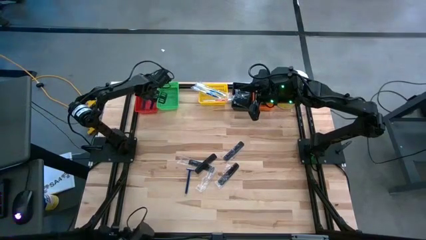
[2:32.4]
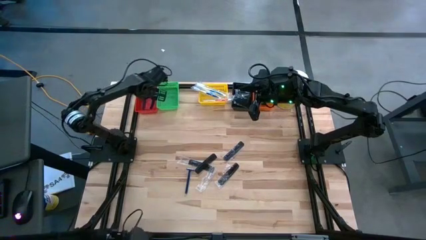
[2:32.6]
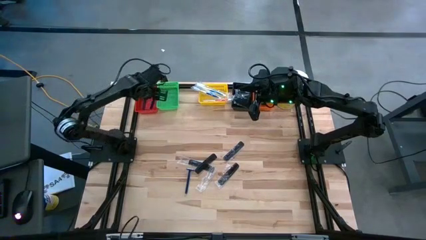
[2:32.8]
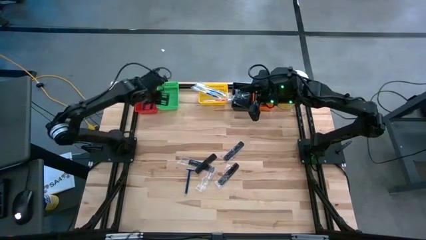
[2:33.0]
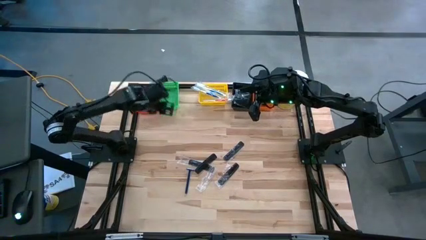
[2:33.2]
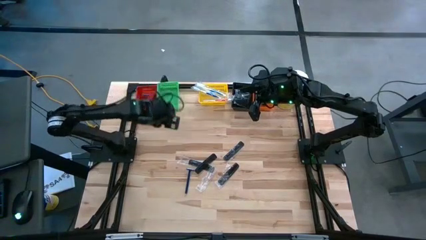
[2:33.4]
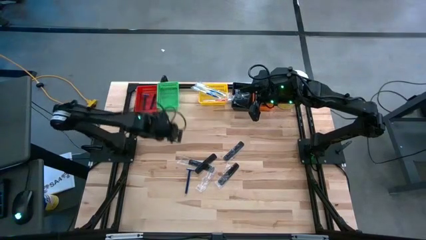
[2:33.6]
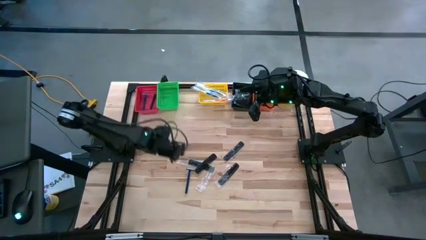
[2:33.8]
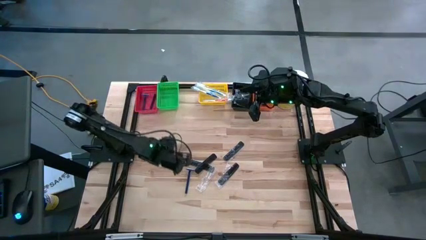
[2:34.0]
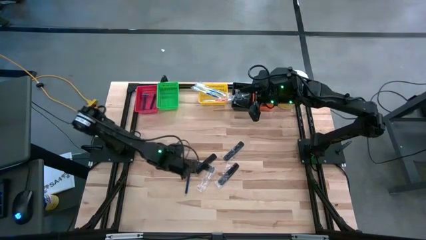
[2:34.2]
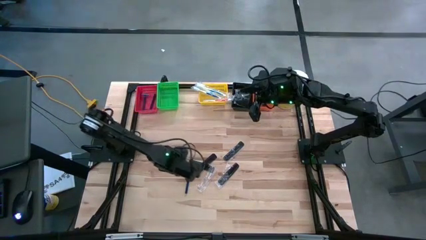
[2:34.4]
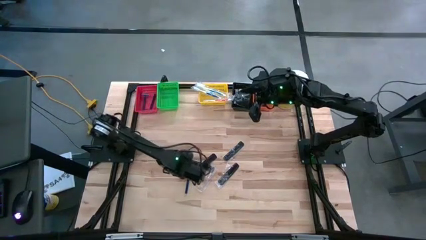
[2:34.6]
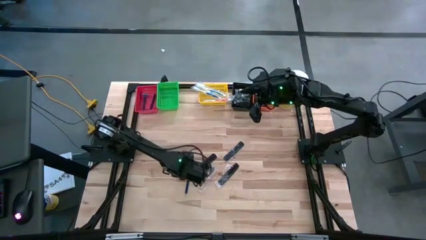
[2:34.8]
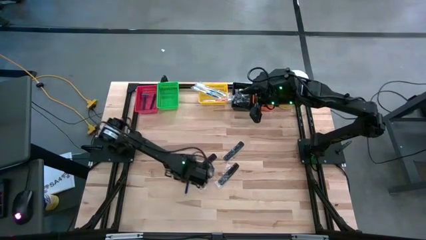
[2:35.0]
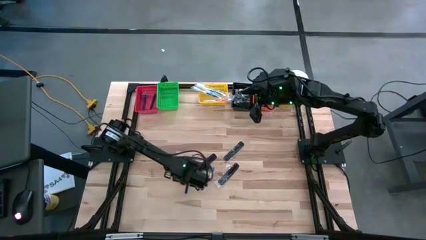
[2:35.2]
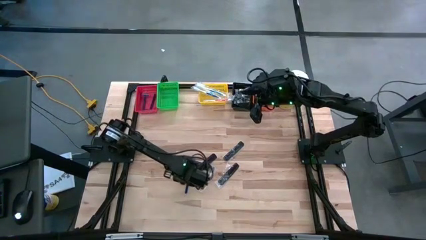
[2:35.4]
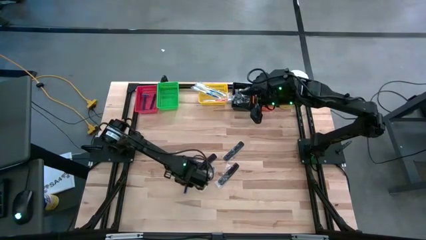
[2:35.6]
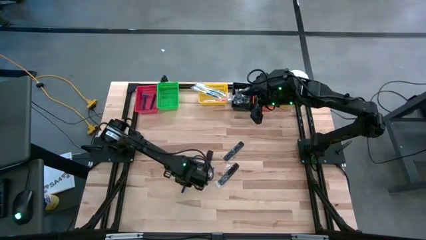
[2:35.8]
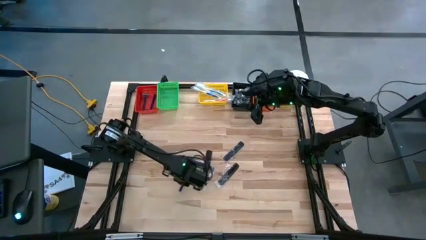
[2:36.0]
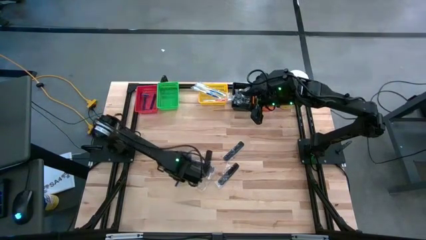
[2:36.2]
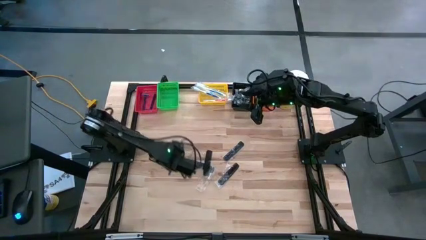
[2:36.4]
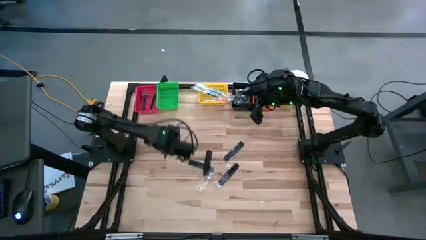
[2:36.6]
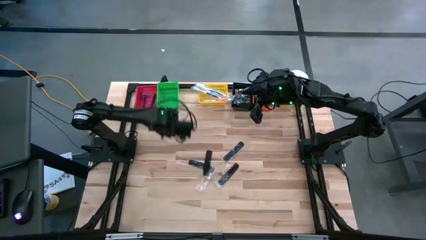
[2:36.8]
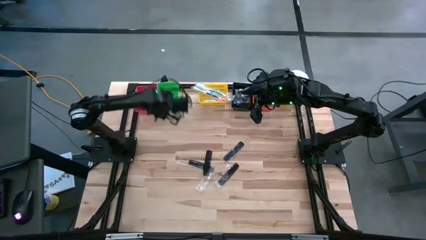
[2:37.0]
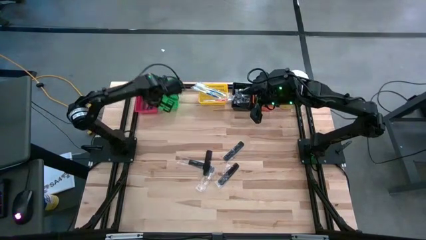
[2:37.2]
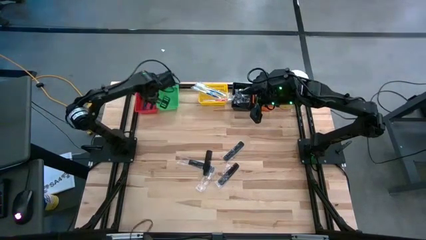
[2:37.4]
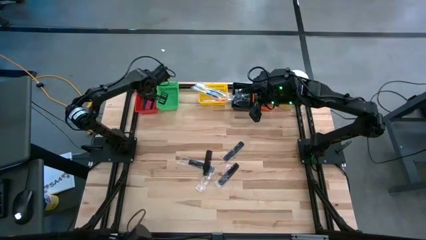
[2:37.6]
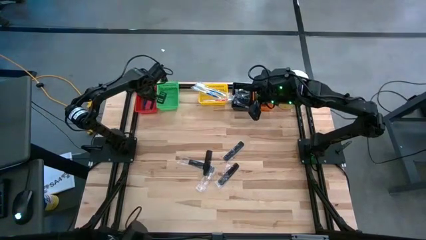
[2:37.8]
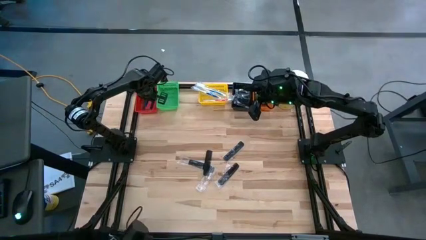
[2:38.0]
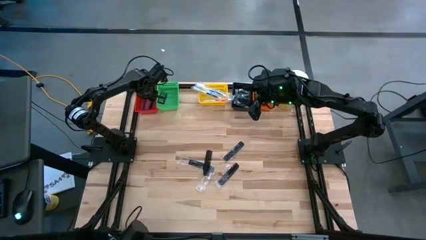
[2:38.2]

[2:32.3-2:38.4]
Task: Pick & Place Travel size toiletries
Put the blue razor into the red bin

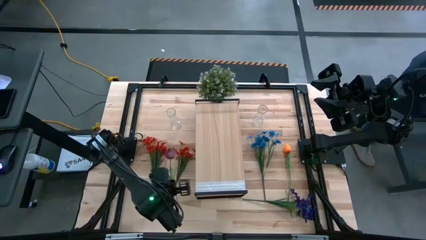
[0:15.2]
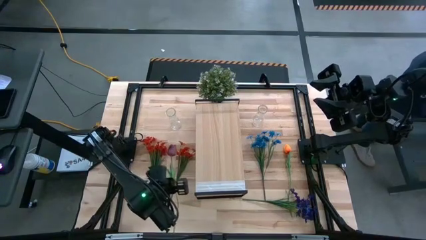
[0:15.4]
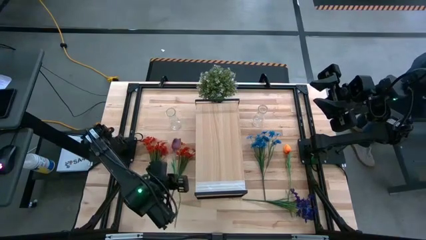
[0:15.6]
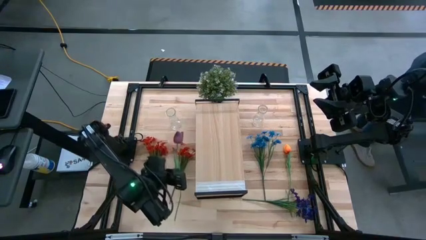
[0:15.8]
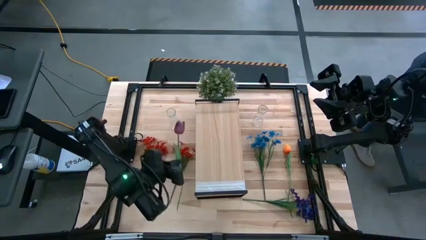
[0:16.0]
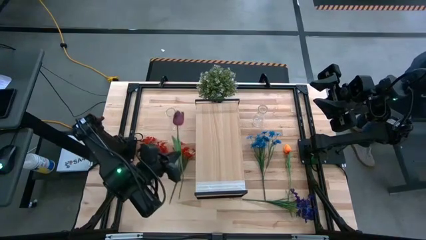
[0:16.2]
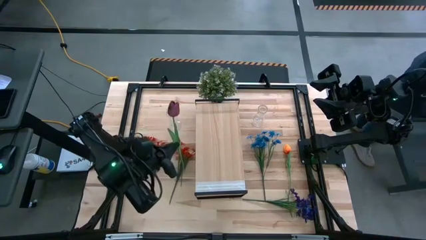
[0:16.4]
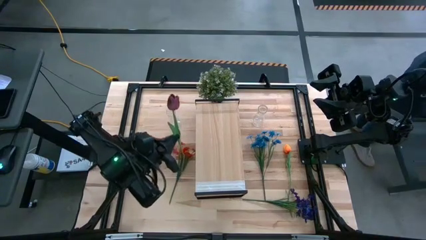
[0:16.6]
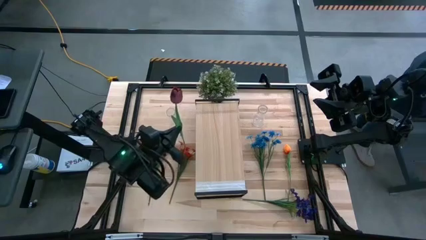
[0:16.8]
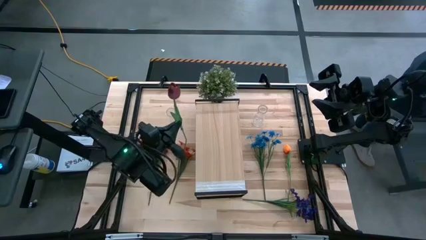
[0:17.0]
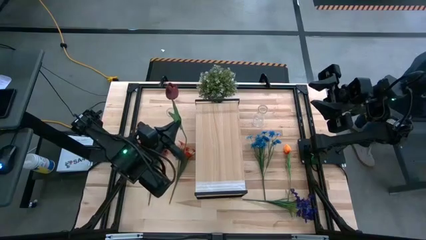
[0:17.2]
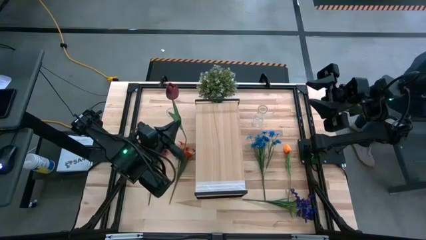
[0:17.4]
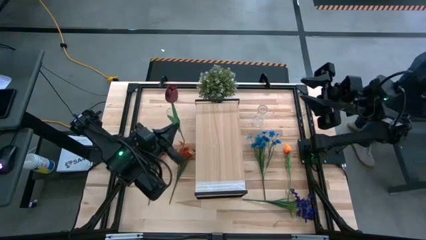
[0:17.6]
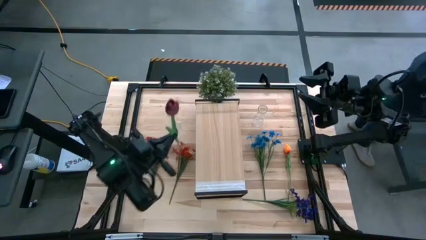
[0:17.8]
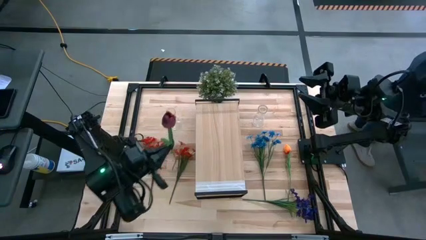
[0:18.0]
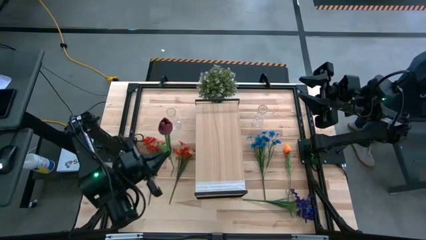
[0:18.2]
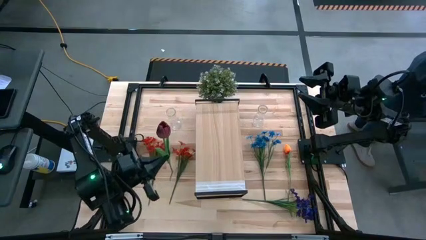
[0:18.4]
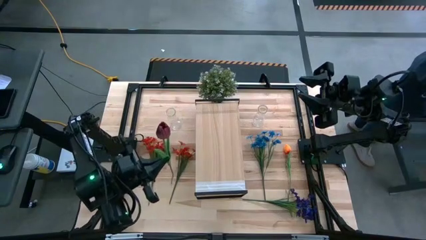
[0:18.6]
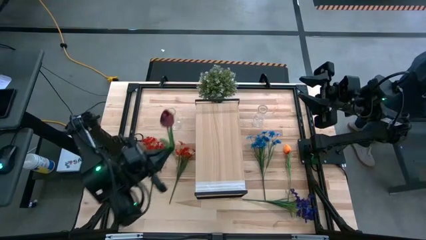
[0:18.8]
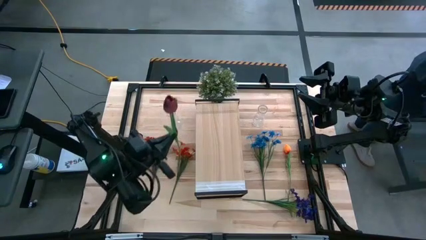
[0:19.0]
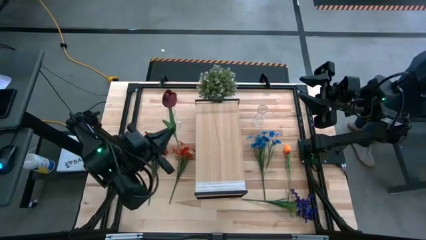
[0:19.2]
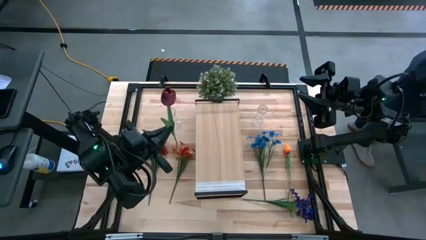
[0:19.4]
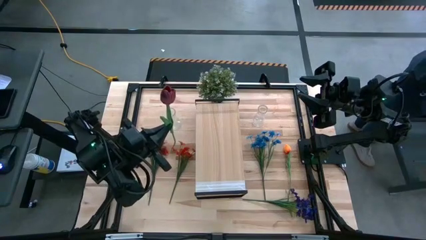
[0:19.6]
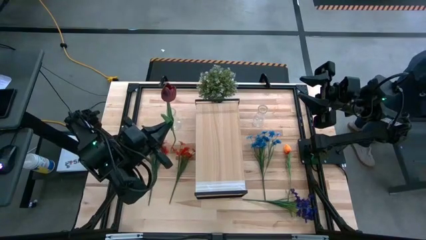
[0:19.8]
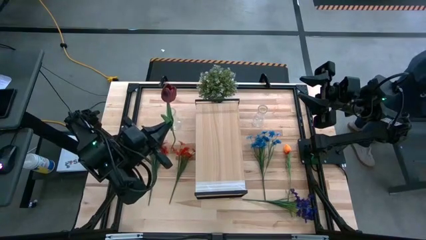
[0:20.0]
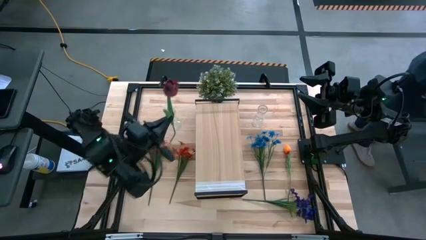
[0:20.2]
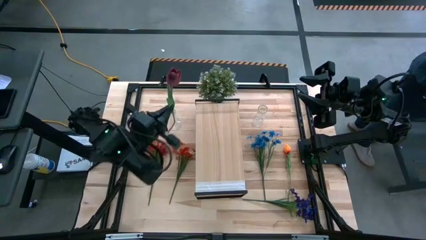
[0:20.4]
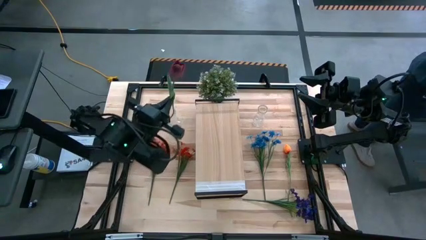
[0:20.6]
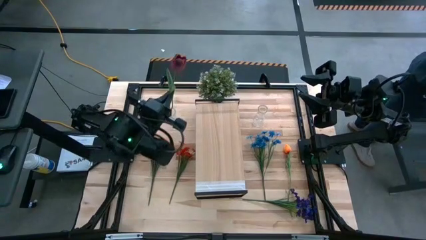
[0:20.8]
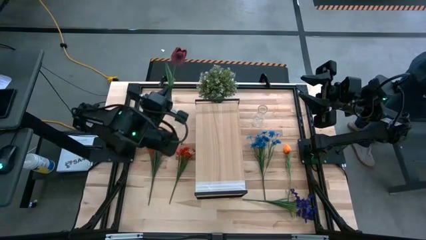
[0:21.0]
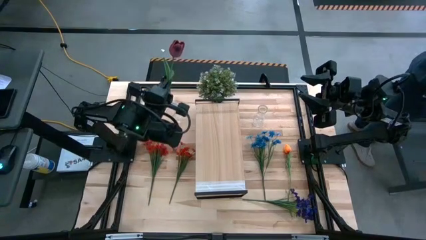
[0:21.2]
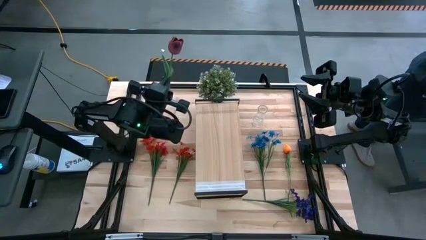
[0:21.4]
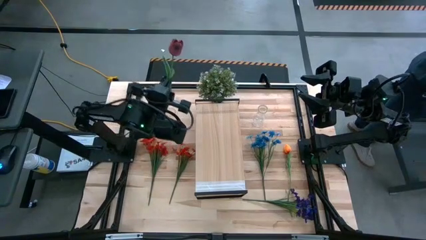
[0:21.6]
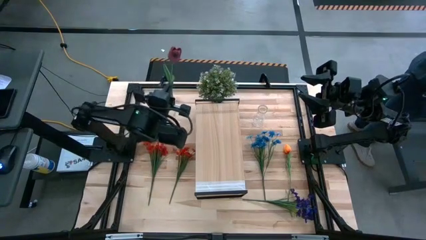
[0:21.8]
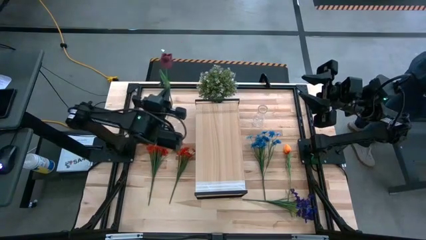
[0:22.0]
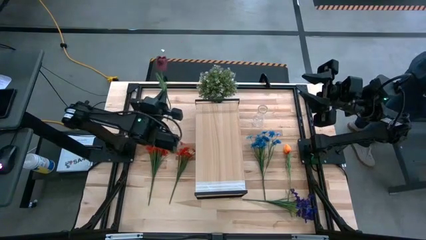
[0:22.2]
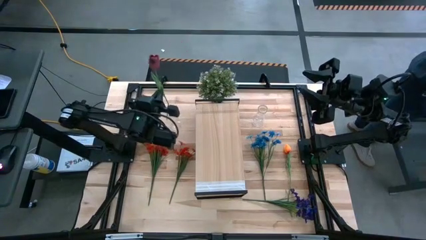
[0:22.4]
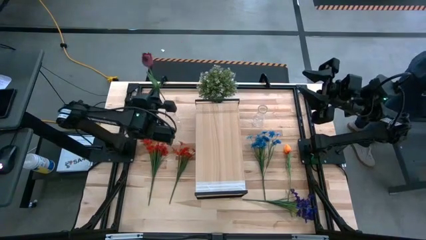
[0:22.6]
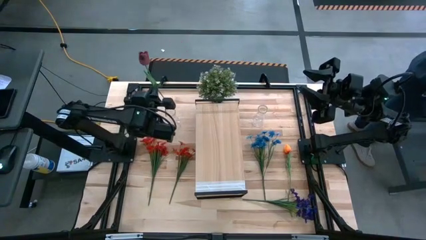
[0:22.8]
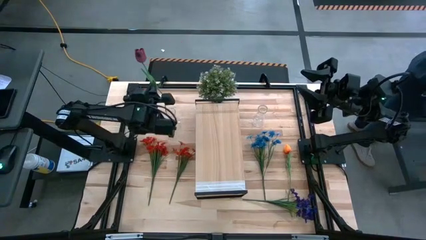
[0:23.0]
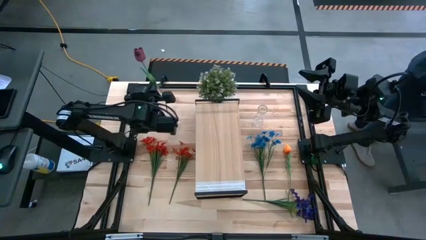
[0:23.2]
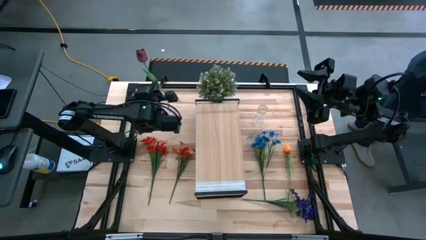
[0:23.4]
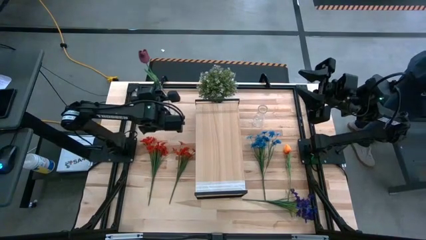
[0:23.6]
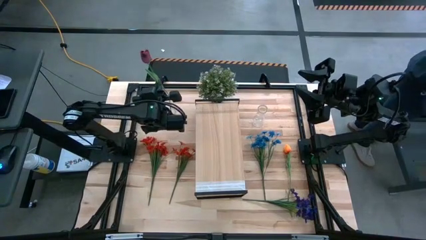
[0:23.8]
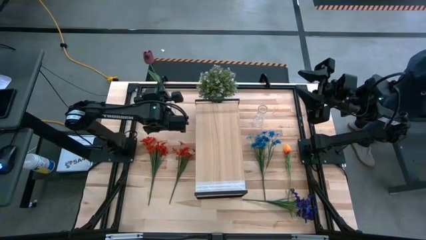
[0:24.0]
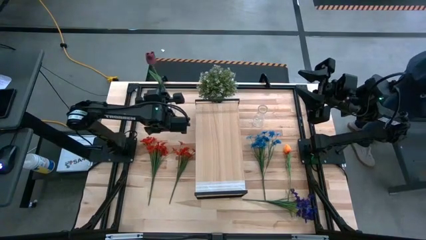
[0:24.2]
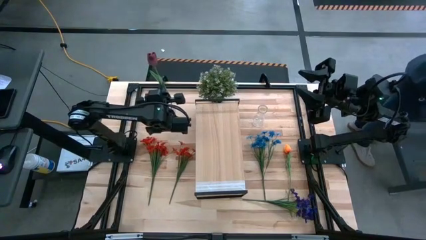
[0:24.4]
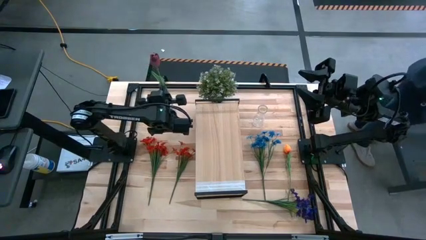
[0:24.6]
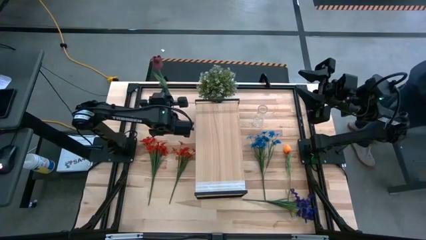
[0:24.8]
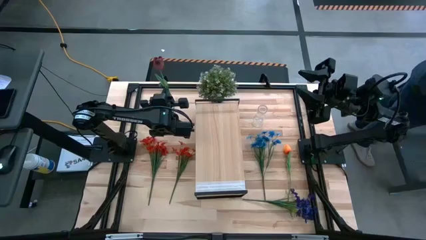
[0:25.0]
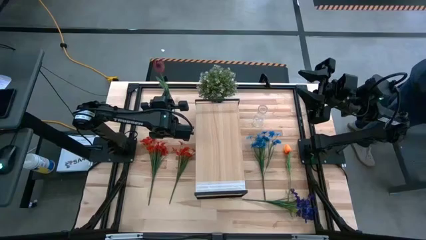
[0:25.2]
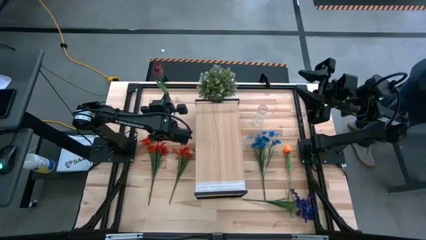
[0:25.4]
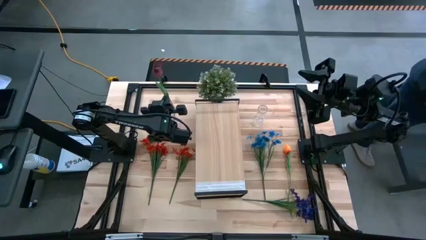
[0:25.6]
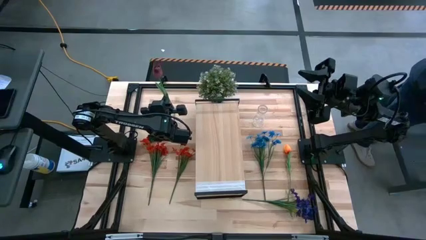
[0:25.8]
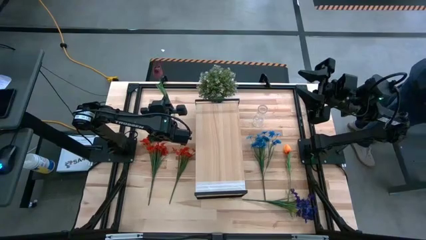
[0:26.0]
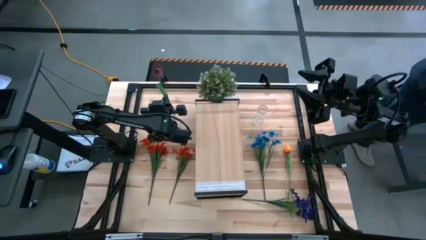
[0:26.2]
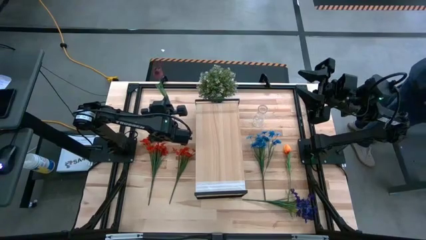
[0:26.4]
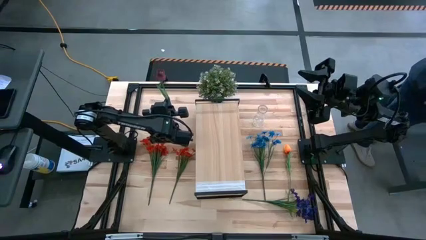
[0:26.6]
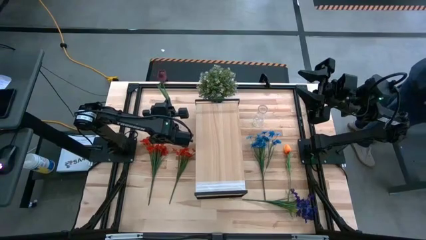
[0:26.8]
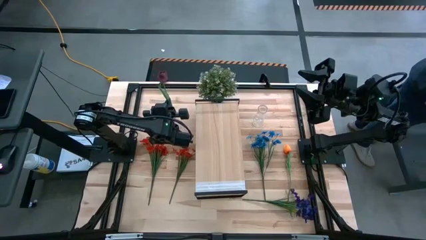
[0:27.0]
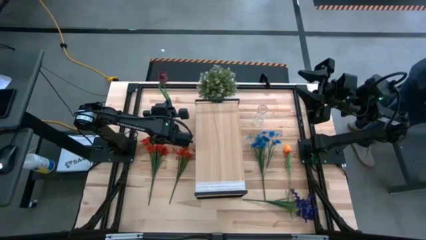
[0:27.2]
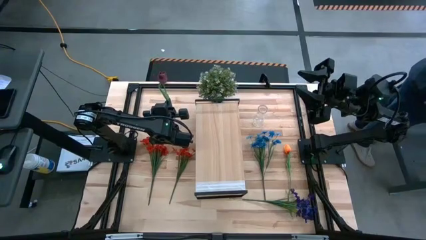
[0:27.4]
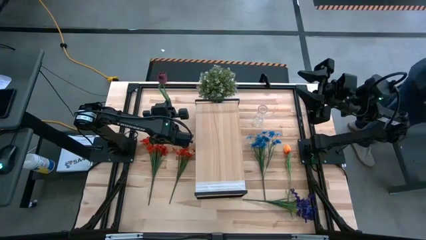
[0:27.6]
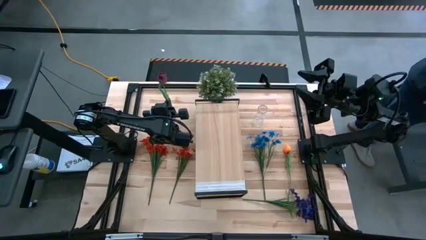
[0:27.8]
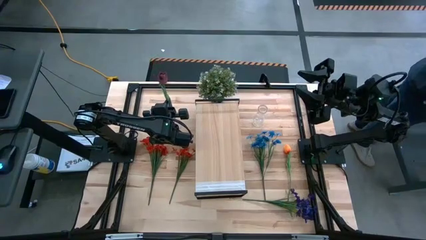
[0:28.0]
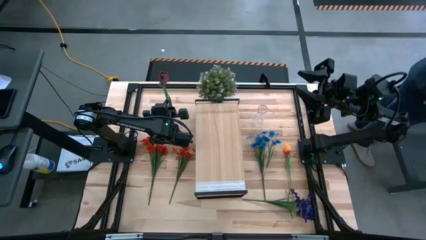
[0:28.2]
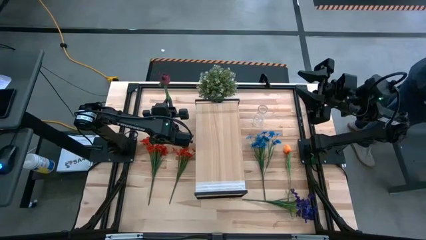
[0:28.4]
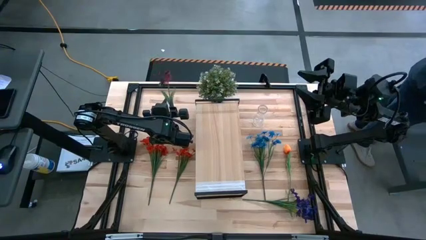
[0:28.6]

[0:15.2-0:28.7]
Task: Pick and place flowers into a vace then onto a shelf
Put the red flower into the left transparent vase
